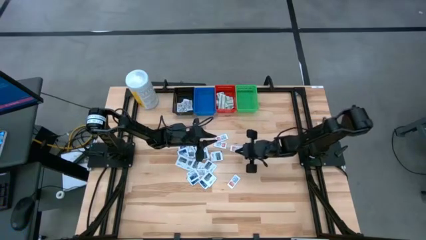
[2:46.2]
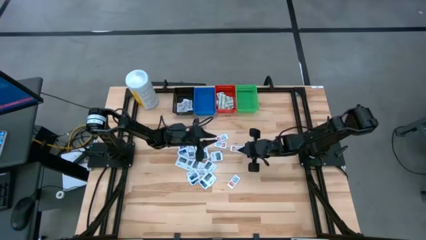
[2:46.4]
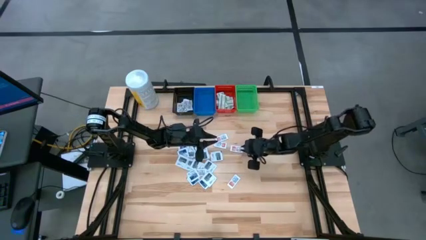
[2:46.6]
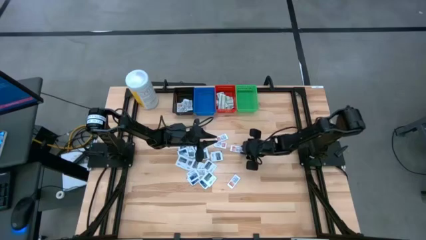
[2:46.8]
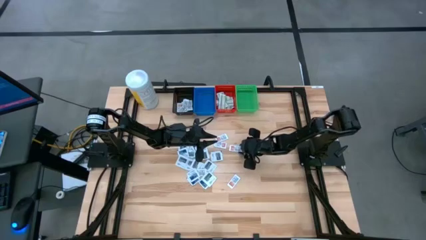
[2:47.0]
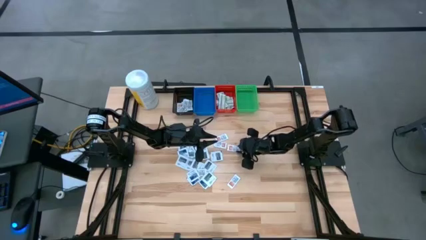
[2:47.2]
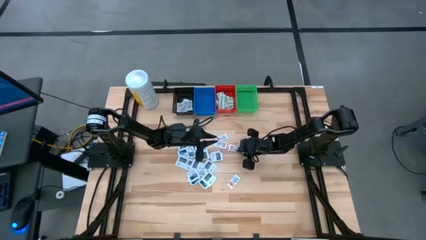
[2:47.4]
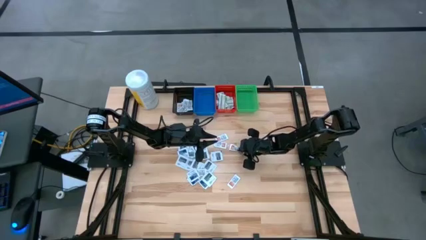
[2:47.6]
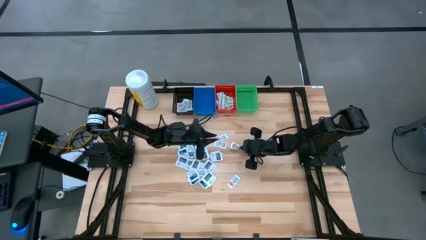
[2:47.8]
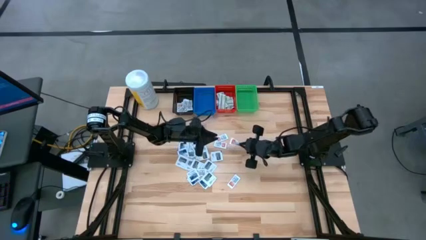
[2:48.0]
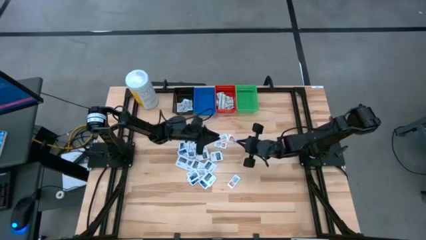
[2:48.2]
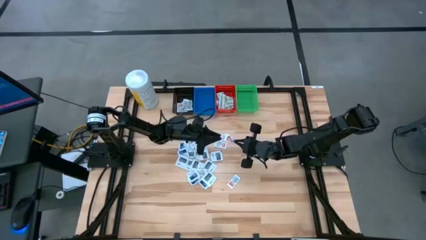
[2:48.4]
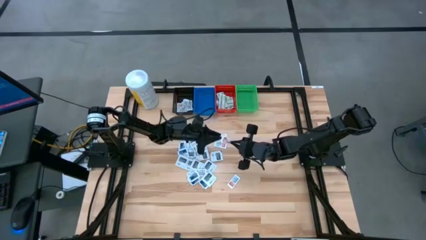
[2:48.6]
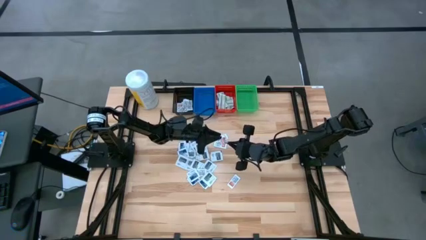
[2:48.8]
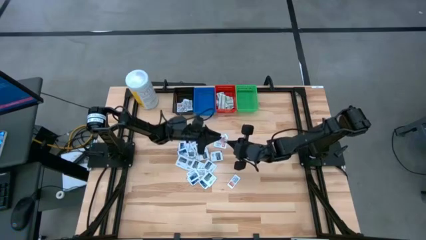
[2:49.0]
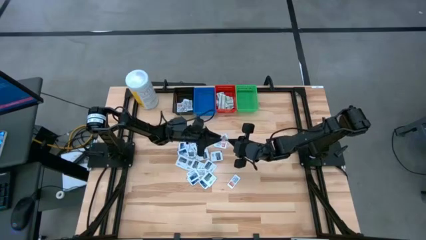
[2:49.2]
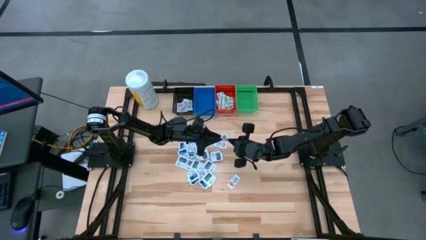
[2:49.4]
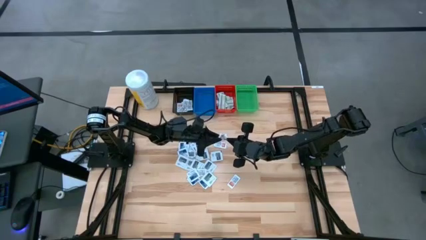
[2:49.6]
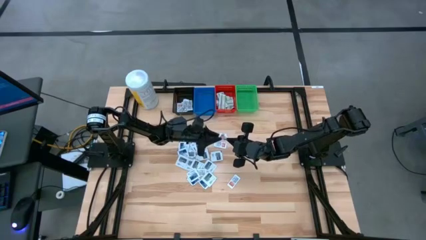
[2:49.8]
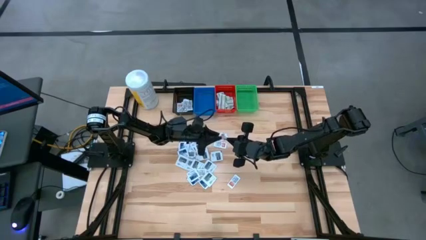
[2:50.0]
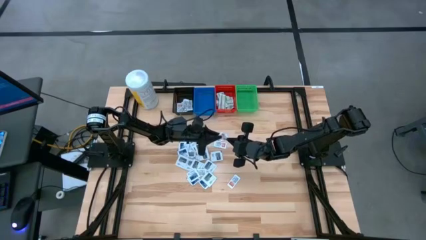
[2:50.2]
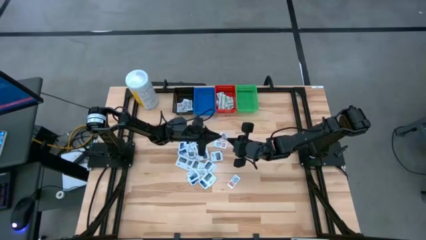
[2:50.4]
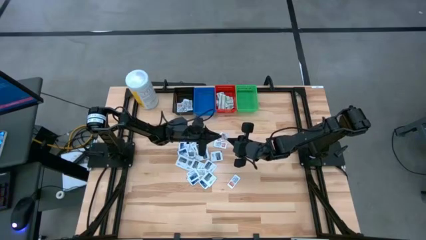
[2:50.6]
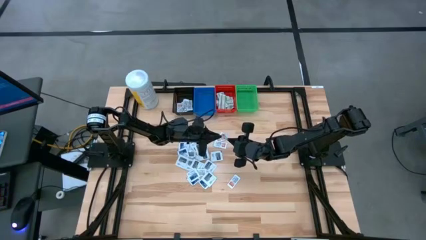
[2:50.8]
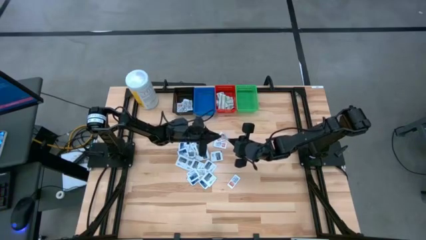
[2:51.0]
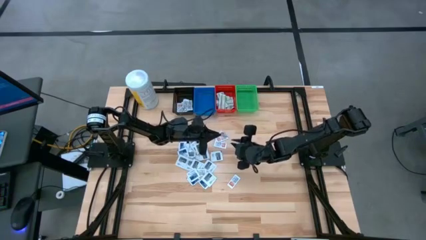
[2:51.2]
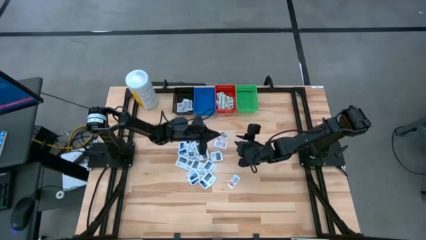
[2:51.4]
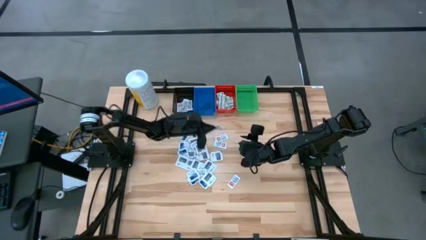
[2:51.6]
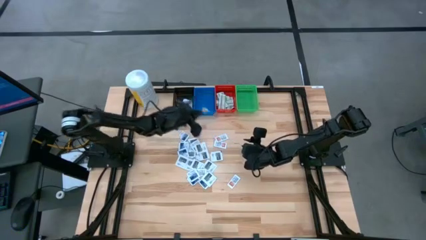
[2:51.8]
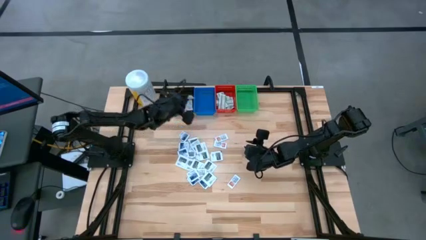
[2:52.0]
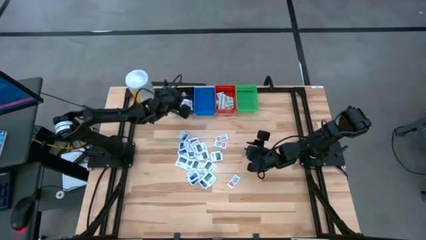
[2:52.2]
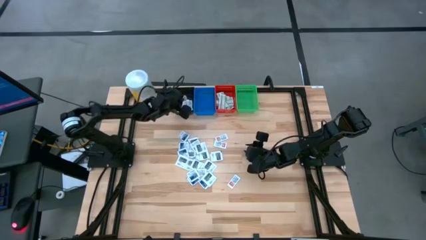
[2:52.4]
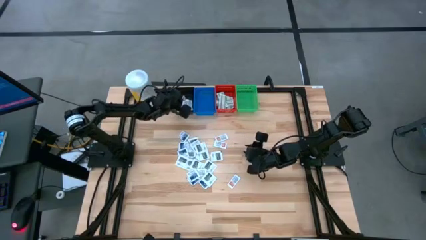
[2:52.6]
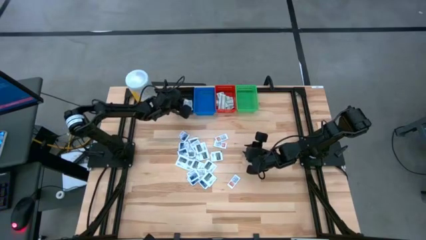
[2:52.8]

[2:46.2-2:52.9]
Task: Pick & Place First Aid Supplies
Put the orange ointment pack into the black bin

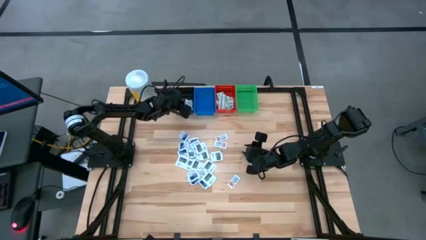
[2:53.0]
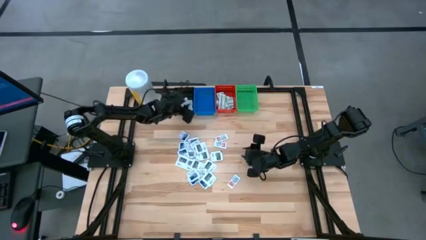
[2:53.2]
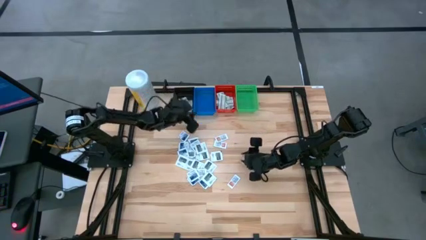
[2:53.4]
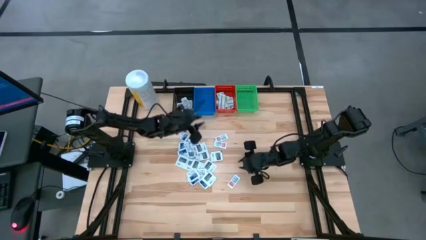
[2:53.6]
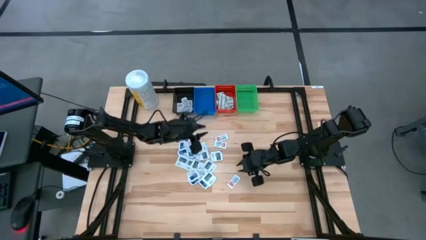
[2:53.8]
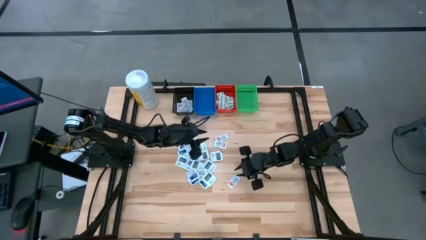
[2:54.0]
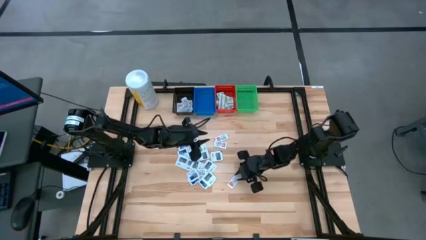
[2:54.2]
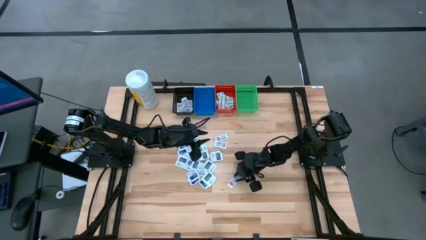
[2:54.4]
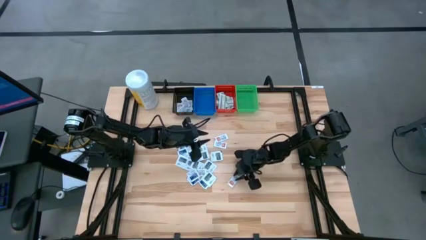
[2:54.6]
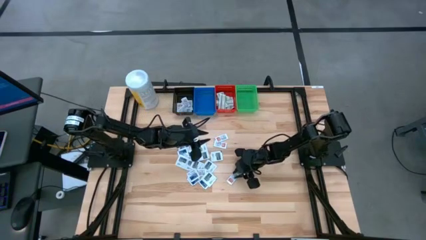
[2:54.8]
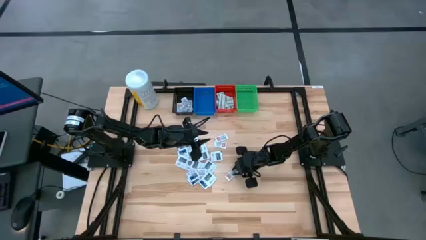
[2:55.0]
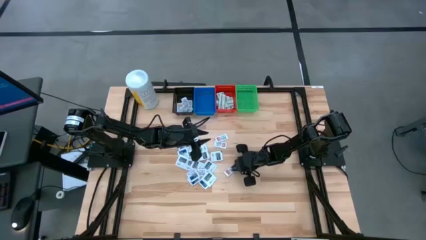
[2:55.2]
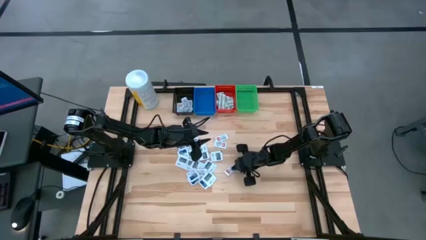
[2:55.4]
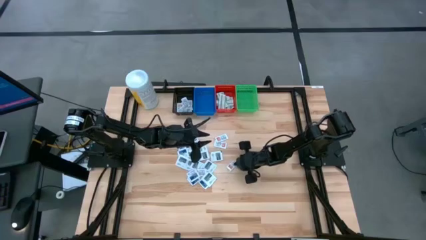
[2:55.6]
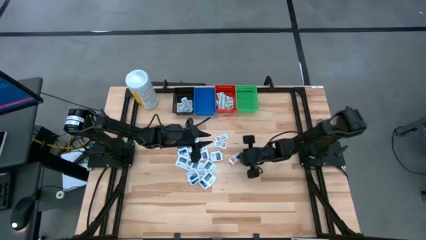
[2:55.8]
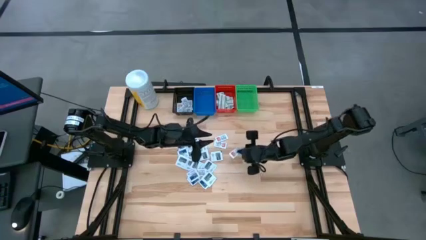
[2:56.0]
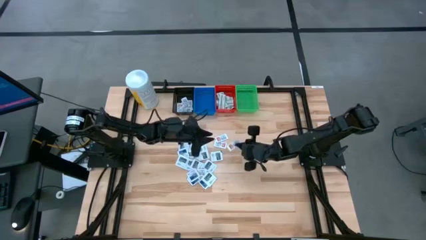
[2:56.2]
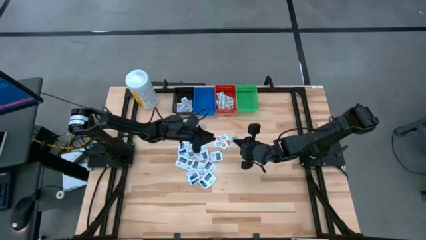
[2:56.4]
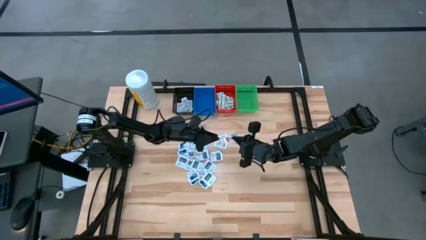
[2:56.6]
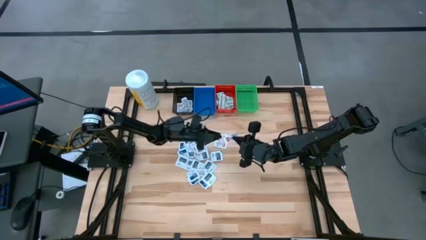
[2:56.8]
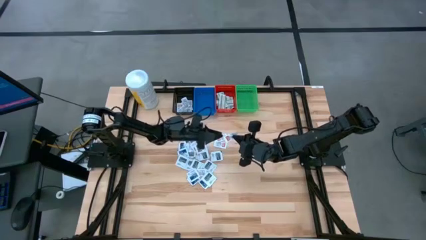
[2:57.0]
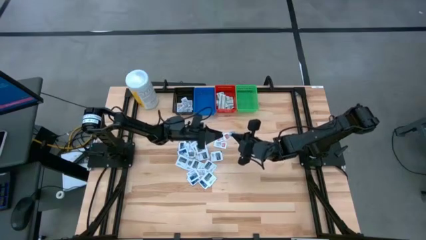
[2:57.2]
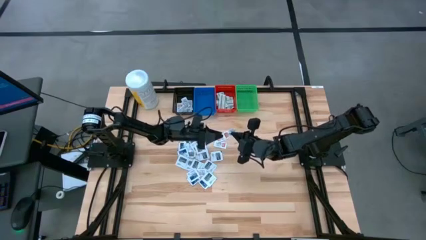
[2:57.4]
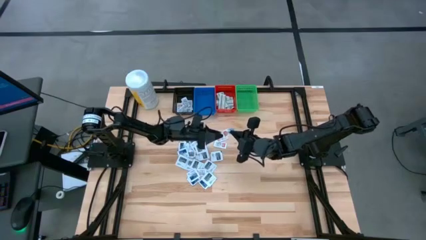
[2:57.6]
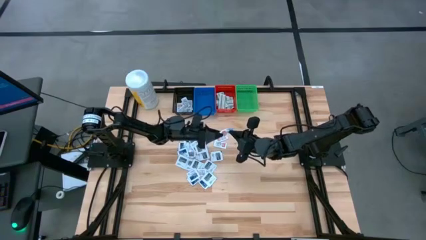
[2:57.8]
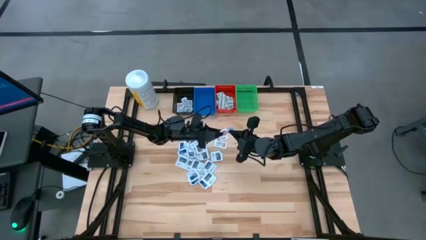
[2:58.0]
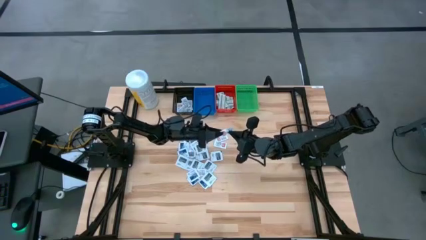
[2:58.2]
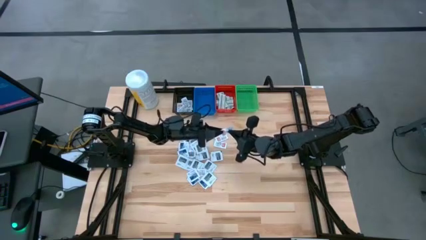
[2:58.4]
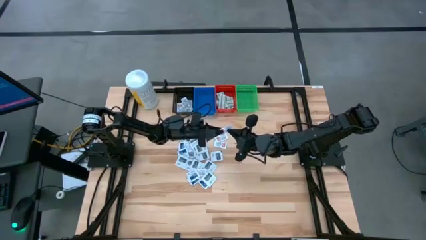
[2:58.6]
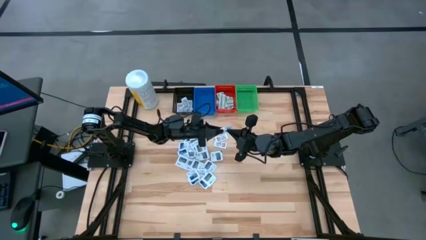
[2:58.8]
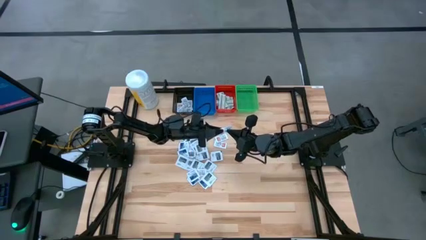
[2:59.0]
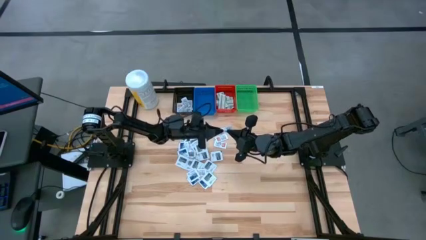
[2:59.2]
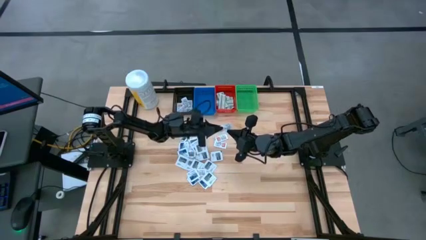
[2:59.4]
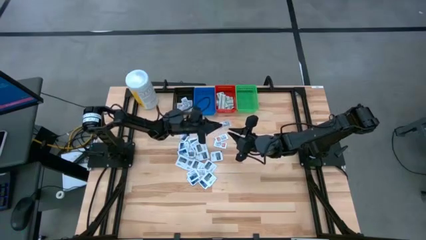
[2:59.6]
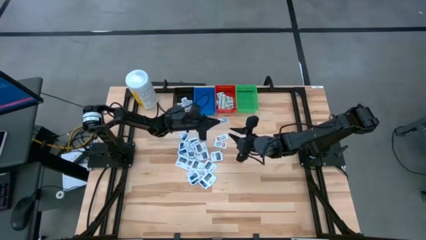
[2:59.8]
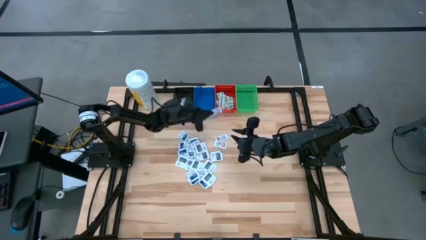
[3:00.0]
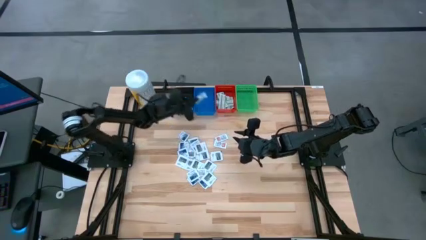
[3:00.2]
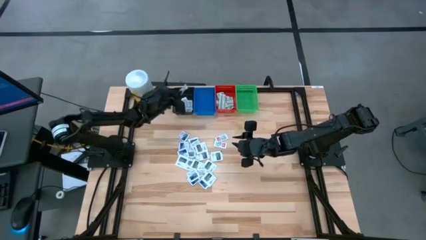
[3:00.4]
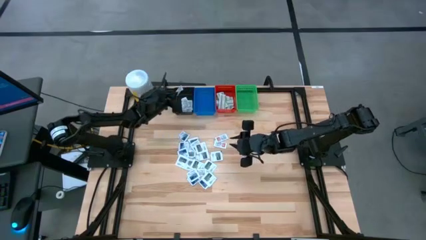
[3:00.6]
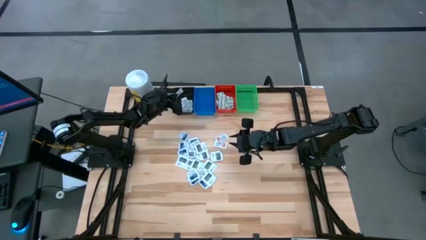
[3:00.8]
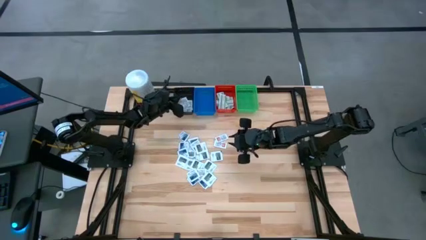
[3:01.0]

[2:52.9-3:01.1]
Put the orange ointment pack into the black bin
